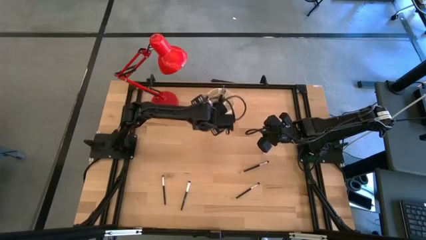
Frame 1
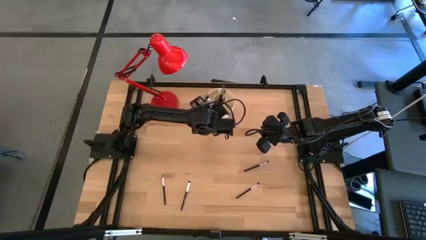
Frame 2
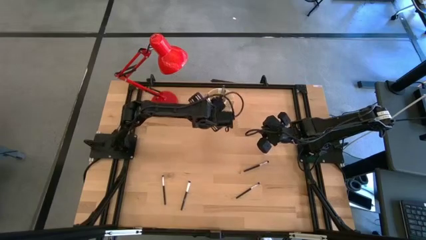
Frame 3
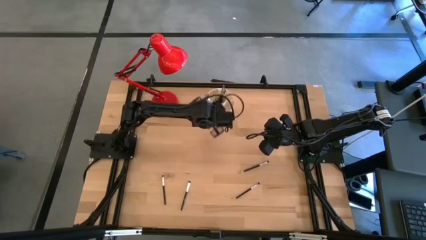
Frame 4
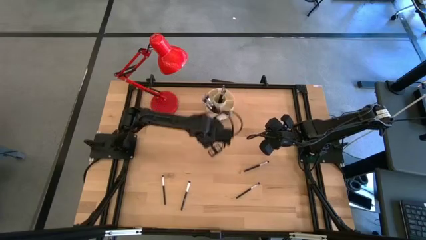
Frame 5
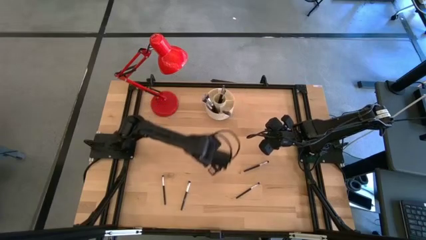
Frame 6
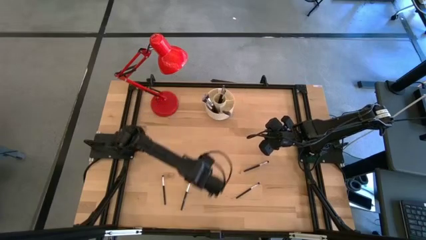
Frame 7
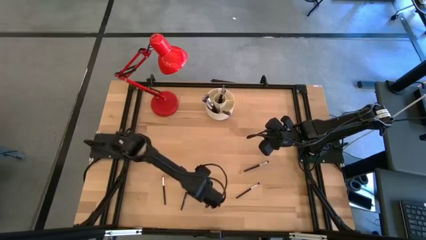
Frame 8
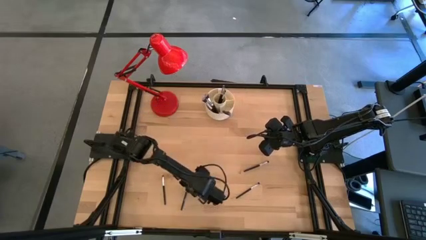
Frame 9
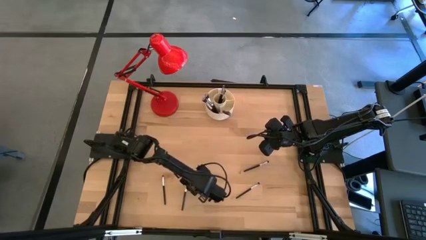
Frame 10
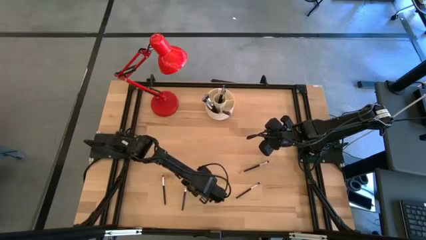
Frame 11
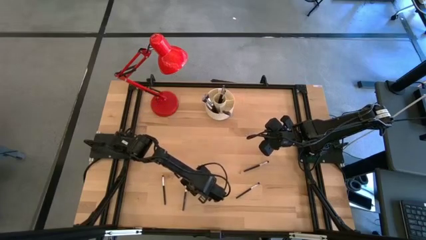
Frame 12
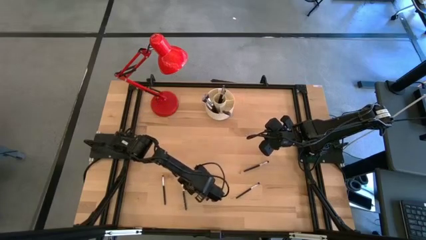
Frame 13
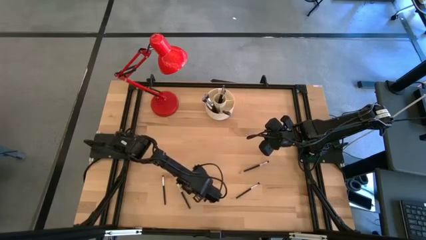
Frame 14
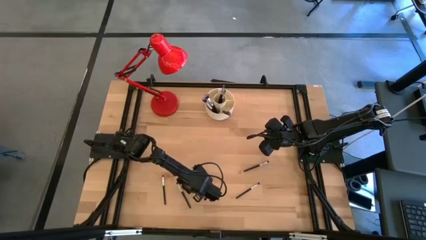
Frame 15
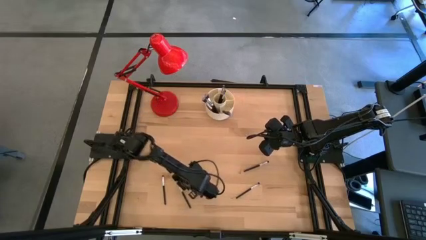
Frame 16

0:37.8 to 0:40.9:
Task: Put items in baskets/containers
Put the black eyeshadow brush into the white organizer

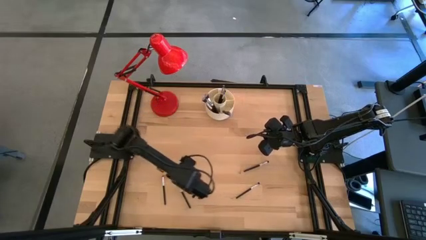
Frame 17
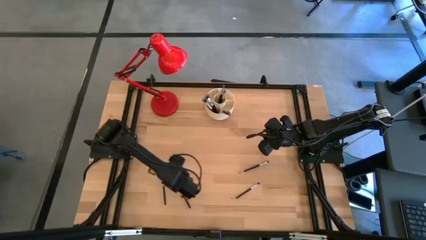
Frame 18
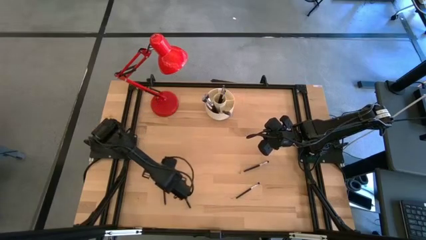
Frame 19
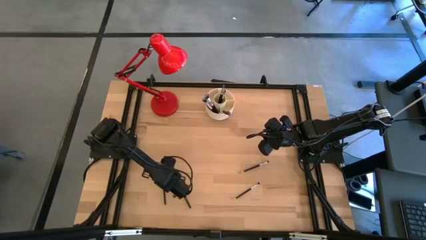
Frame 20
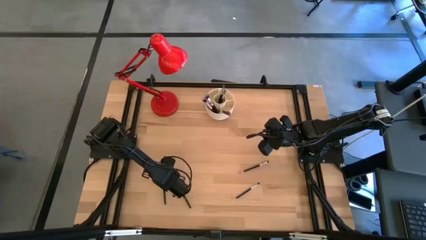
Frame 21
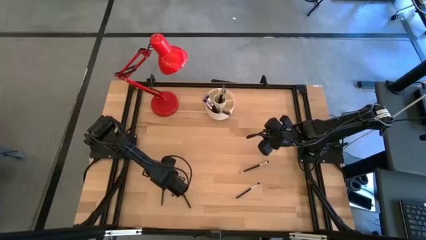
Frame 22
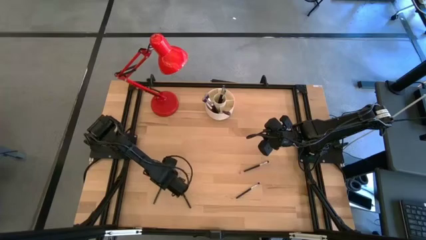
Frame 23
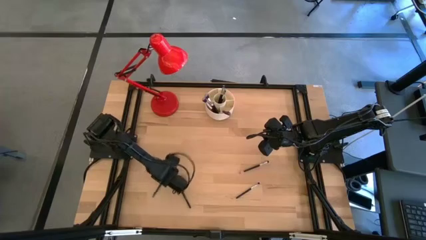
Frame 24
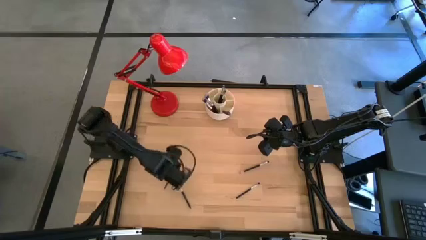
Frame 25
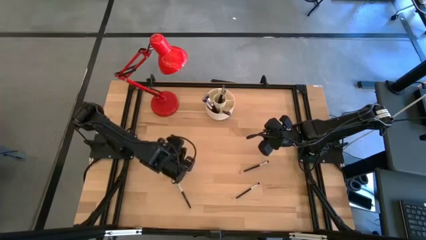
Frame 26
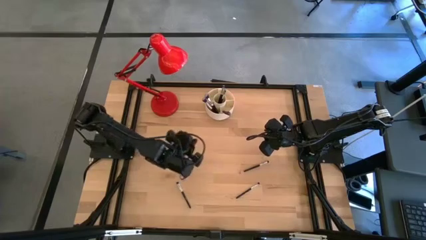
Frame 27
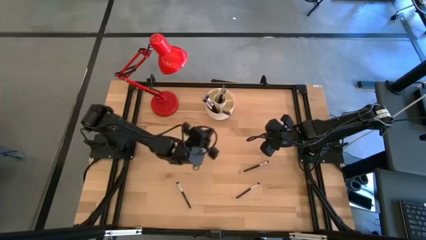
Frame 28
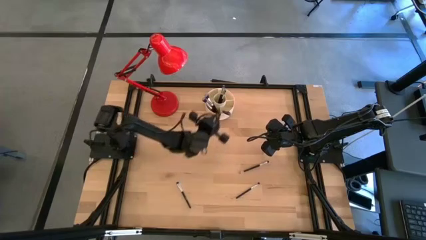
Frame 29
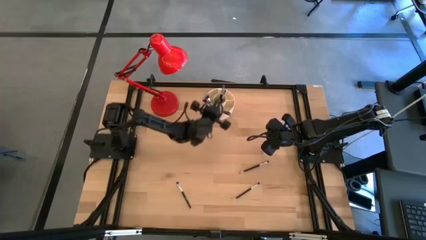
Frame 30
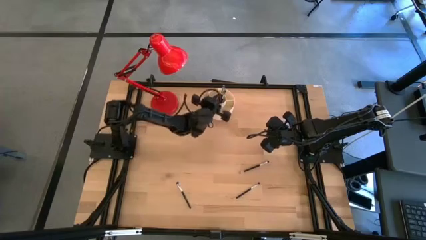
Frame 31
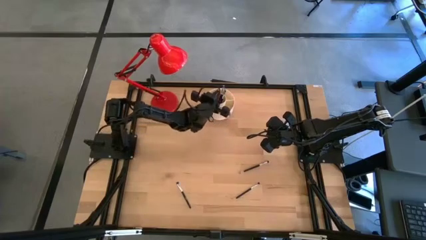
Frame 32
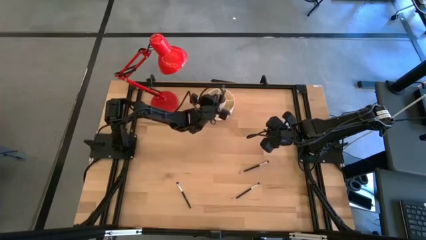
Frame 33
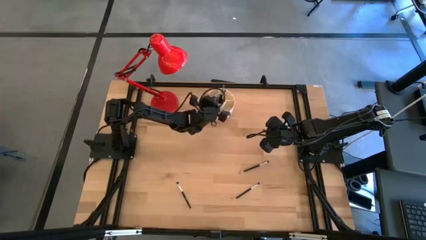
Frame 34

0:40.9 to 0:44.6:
Put the black eyeshadow brush into the white organizer

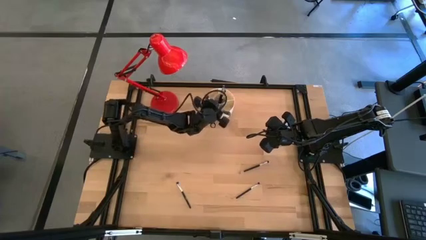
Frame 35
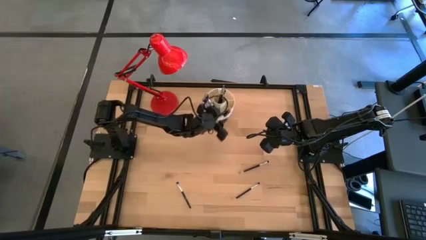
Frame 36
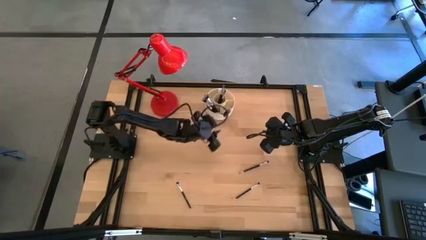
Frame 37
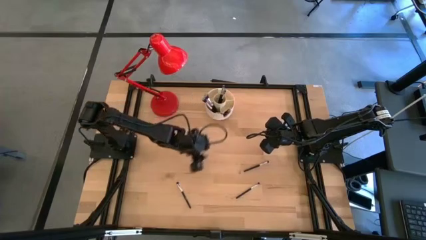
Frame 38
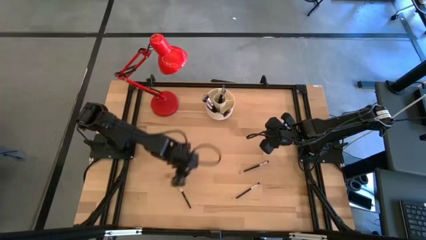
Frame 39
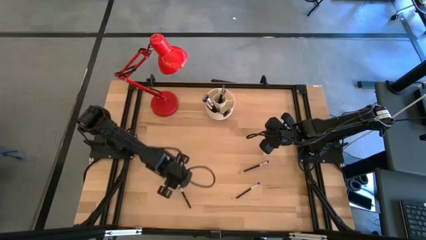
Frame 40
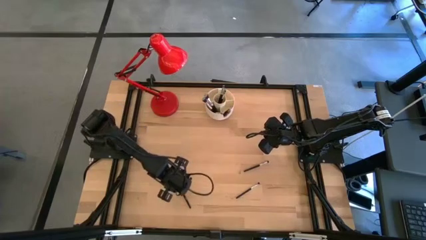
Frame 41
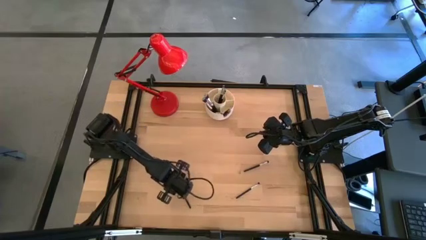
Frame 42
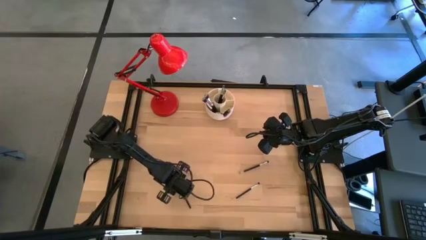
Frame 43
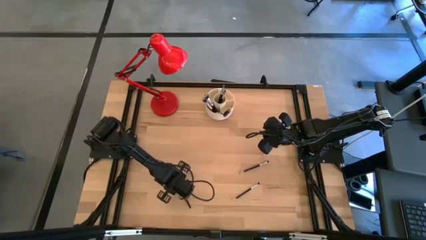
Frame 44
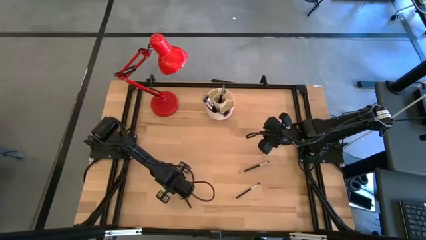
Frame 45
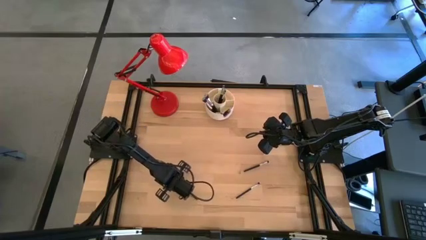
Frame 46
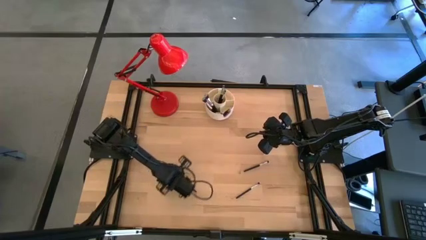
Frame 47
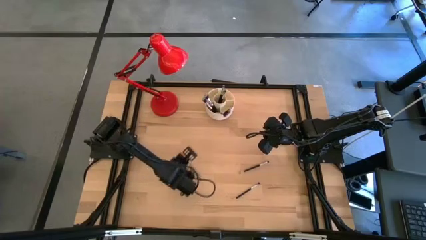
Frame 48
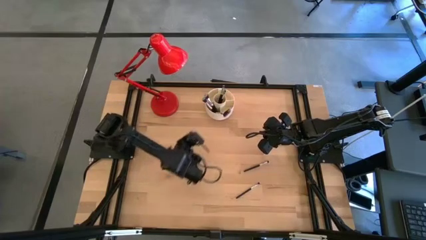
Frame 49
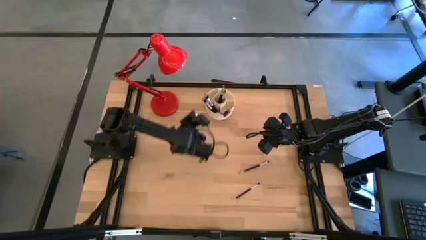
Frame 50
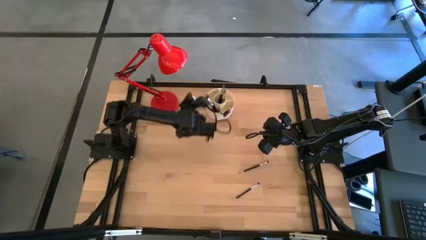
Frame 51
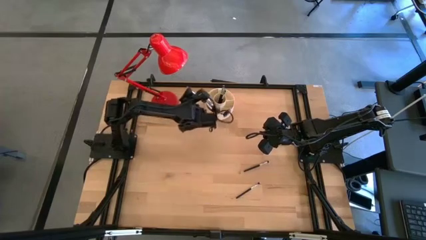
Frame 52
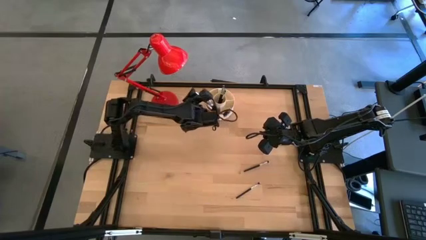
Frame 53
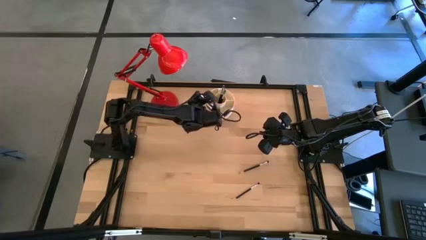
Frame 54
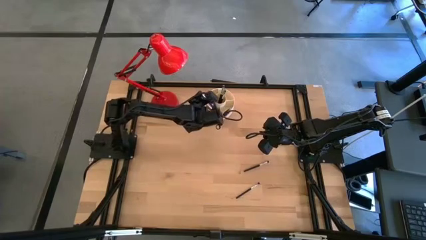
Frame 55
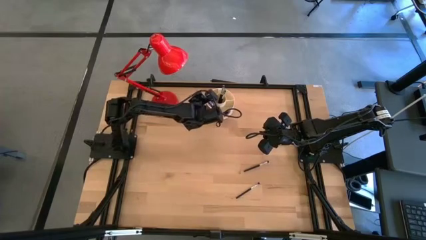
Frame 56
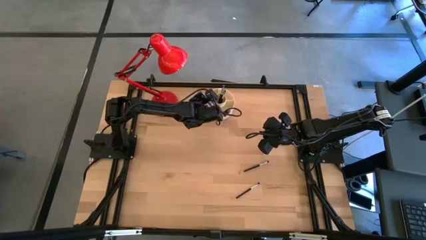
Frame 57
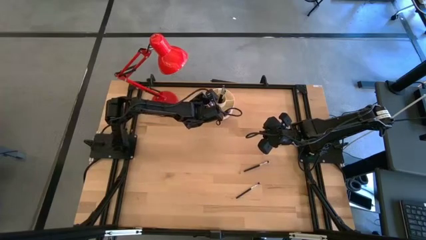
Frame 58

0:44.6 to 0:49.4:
Put the black eyeshadow brush into the white organizer

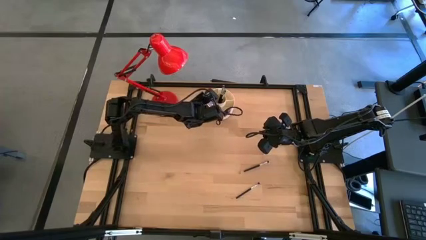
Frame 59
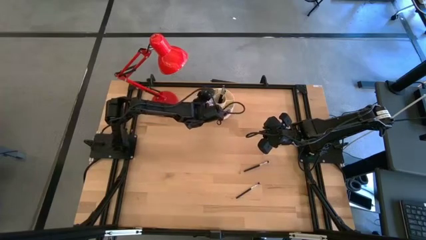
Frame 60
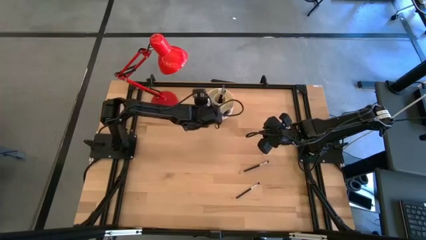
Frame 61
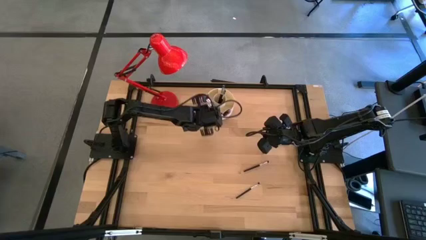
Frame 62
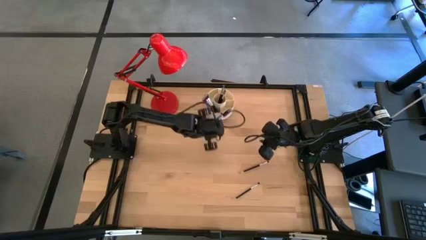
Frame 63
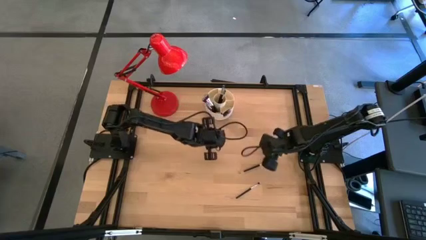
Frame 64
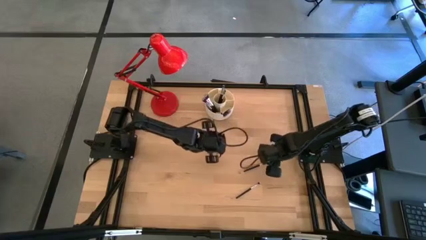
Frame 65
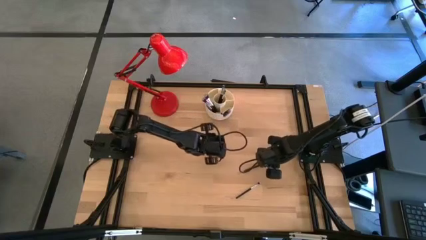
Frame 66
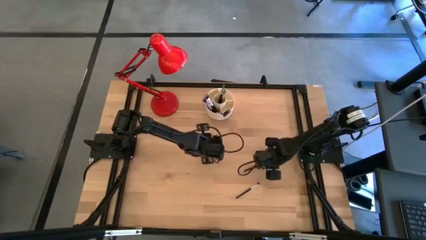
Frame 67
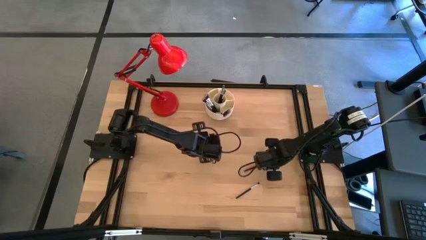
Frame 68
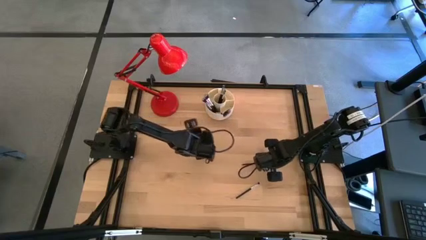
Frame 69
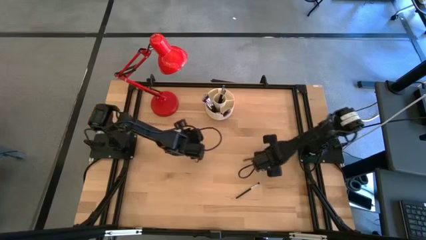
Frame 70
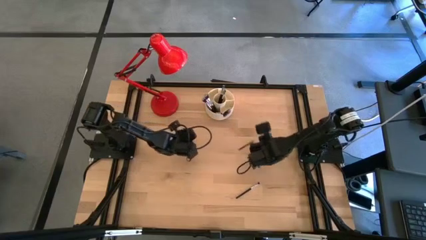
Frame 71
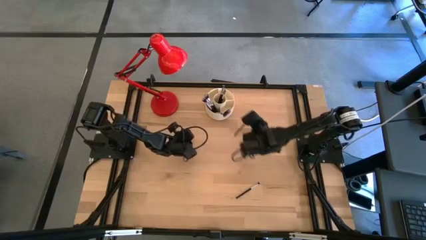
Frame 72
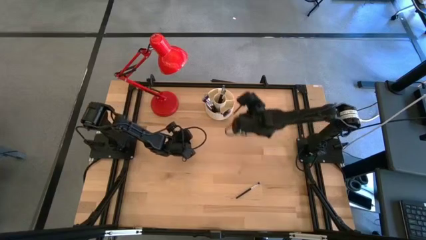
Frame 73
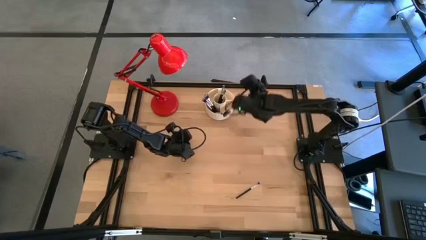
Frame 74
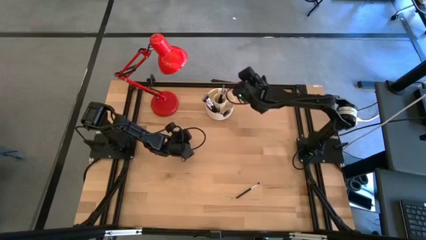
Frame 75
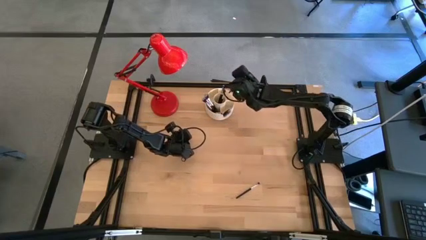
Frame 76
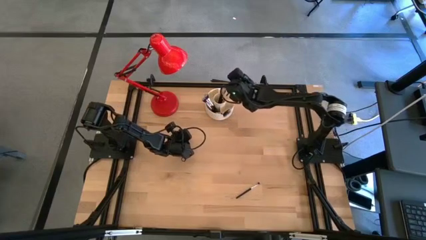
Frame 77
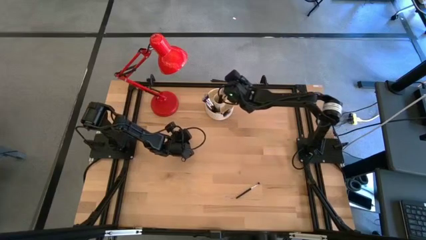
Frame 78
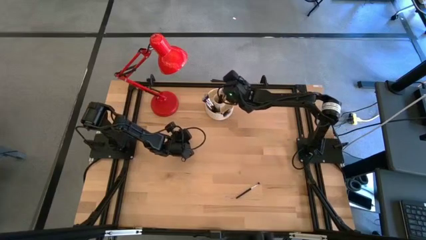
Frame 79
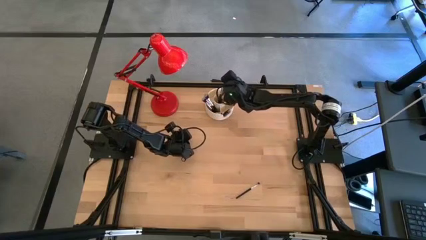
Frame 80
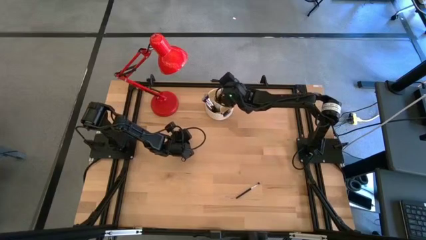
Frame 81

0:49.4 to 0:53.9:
Put the black eyeshadow brush into the white organizer
